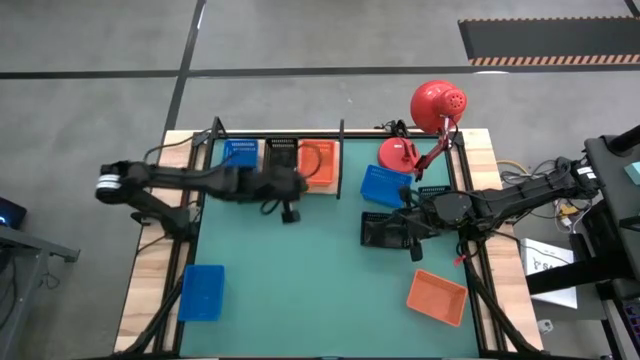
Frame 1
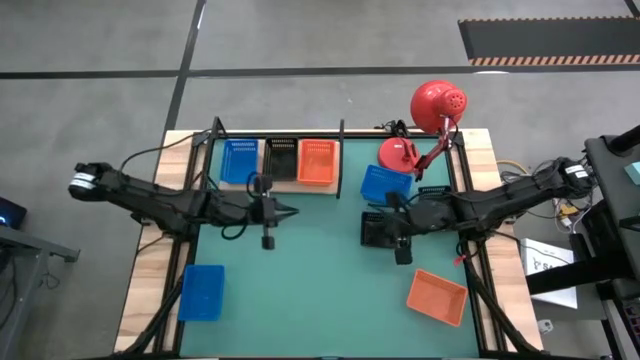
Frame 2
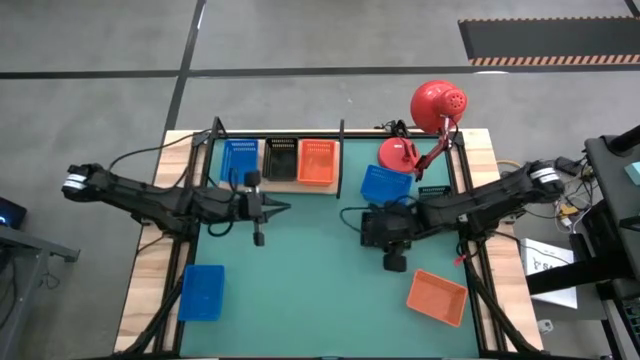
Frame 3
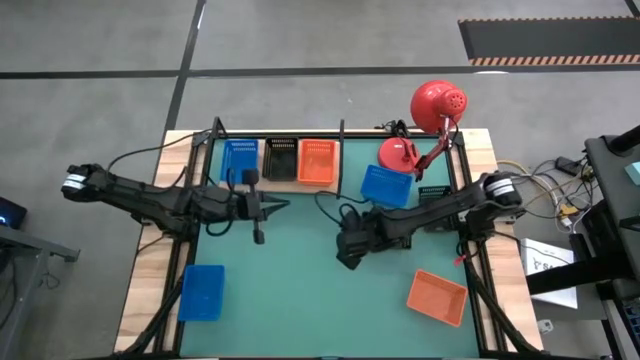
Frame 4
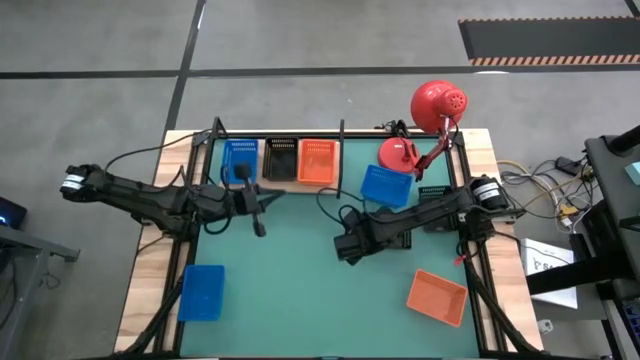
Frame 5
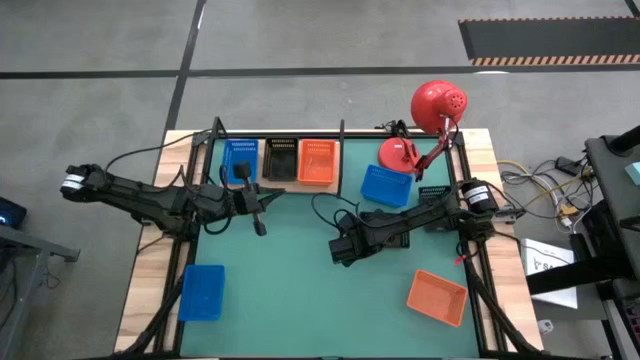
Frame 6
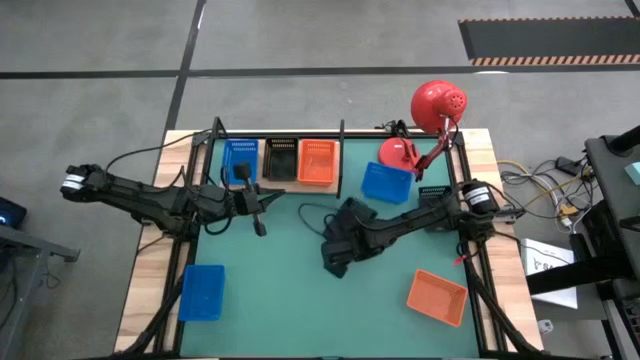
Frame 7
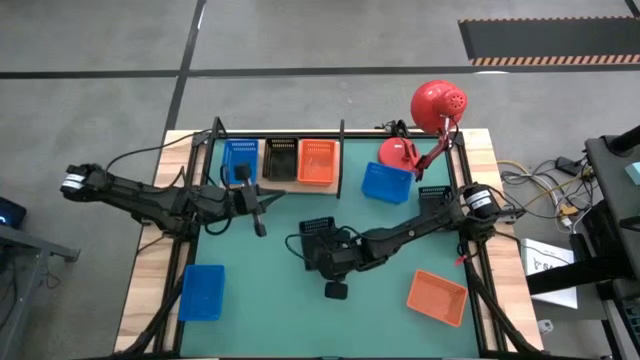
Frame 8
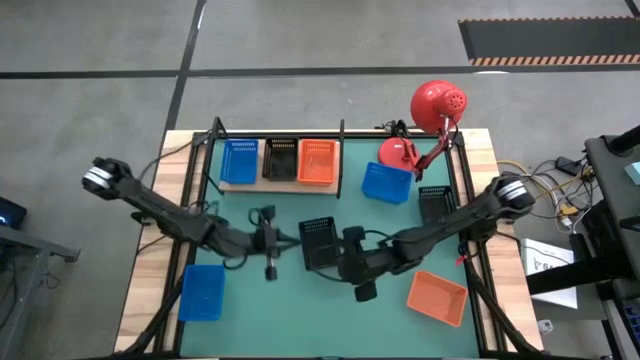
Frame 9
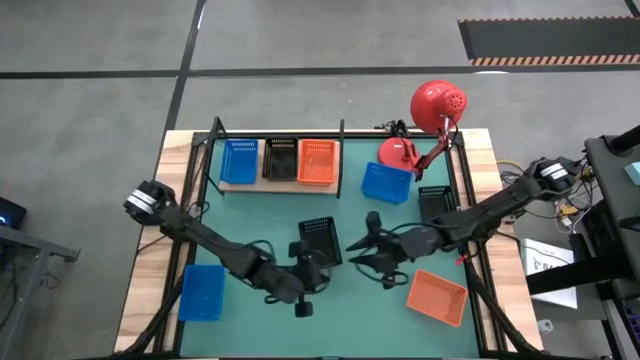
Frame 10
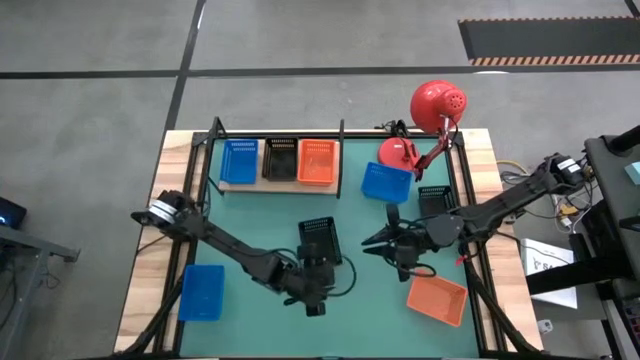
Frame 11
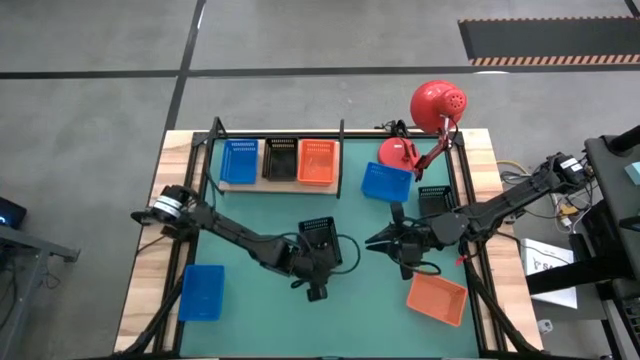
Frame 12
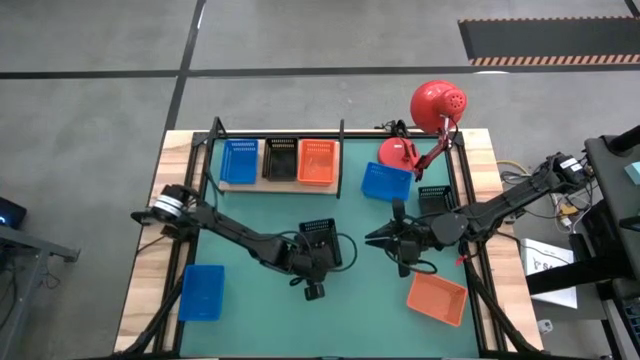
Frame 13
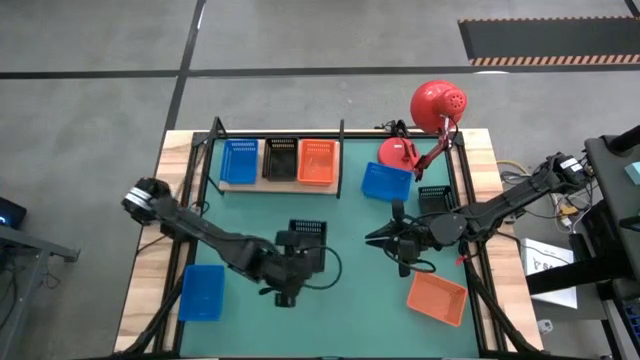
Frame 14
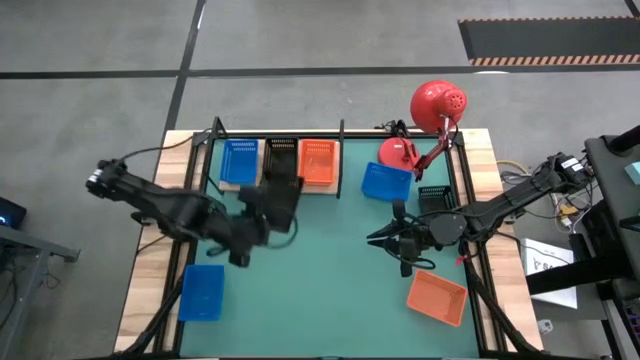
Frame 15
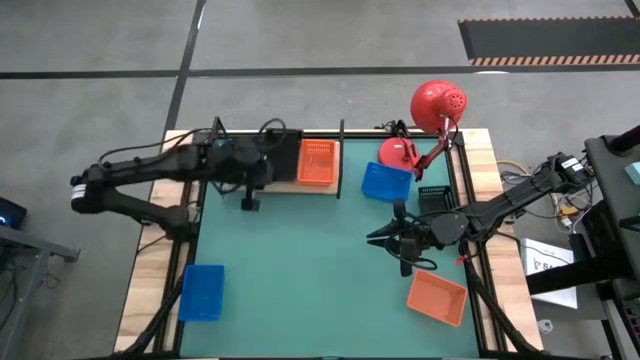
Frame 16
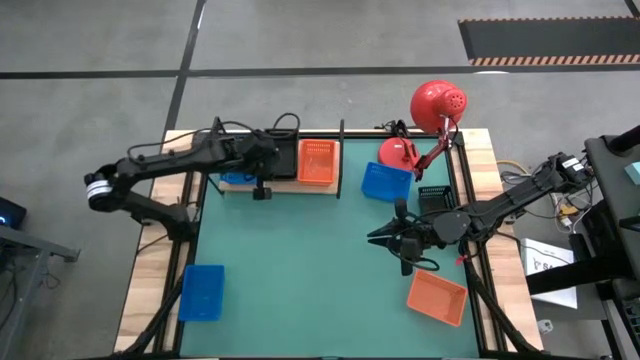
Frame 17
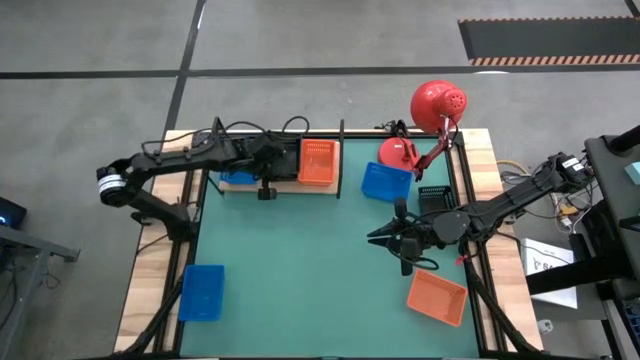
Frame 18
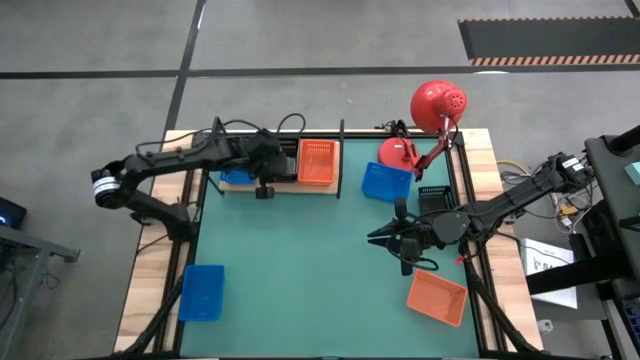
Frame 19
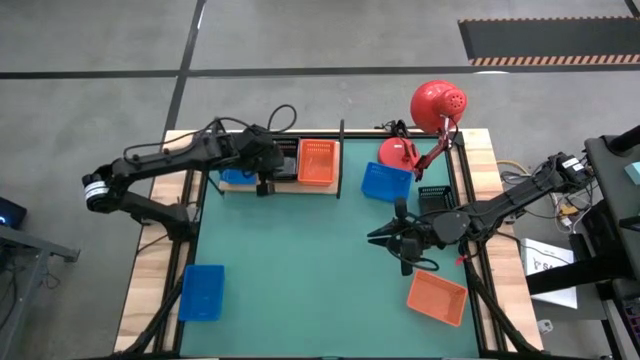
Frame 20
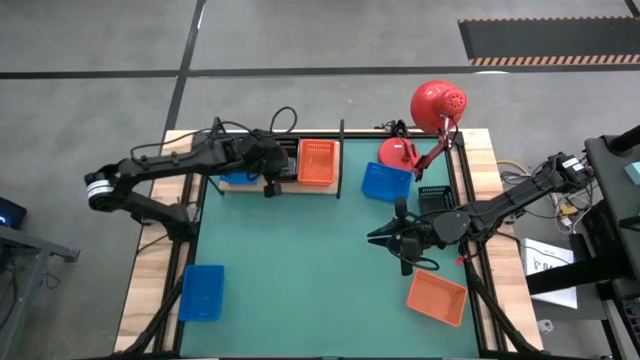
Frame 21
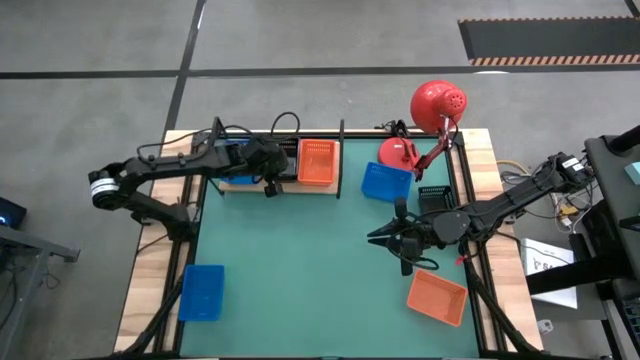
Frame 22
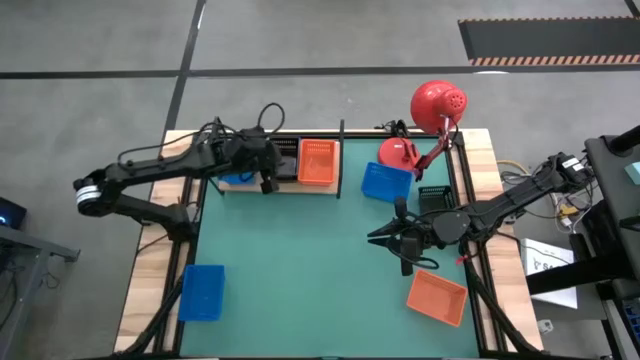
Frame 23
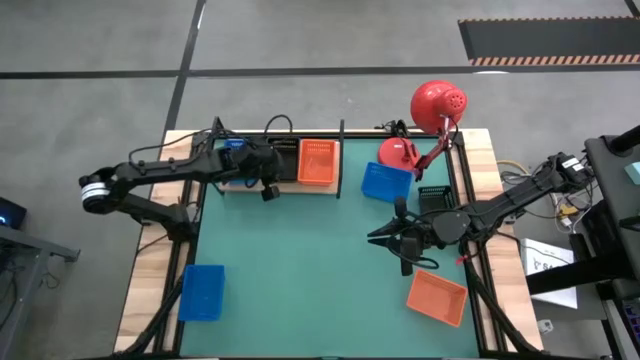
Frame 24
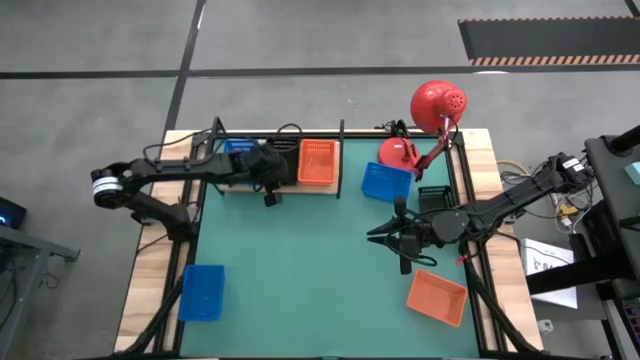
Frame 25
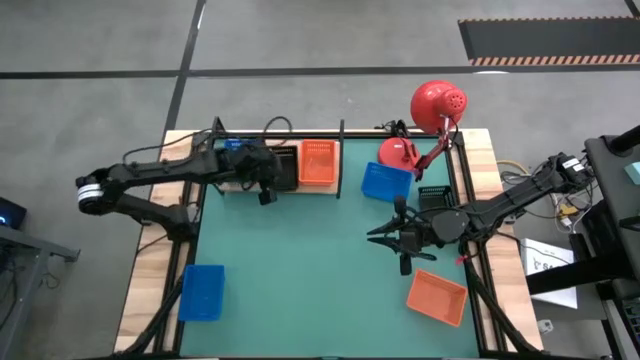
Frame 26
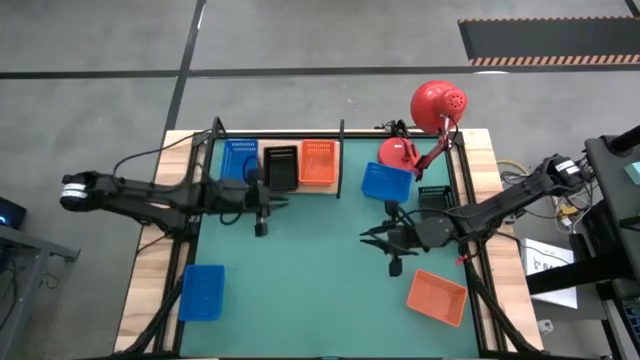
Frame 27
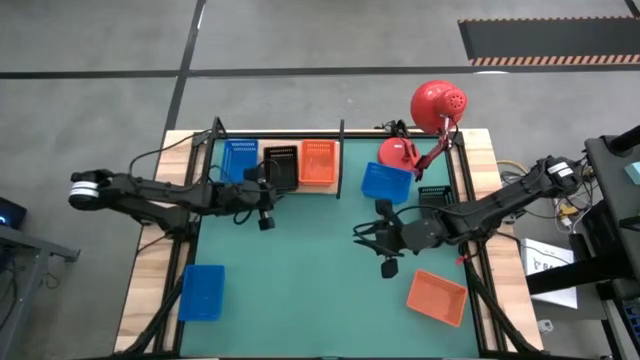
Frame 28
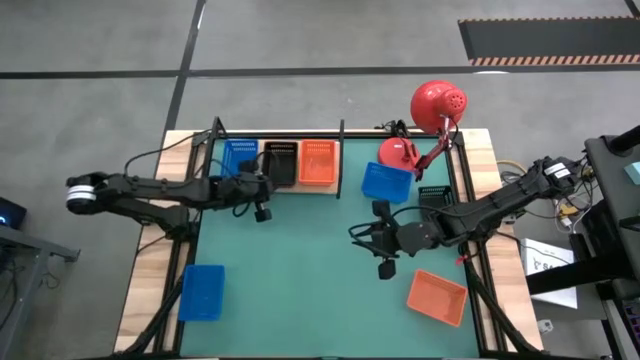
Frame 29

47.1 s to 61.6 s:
Task: Stack baskets on shelf by color
Stack the left black bin on top of the black bin on the shelf

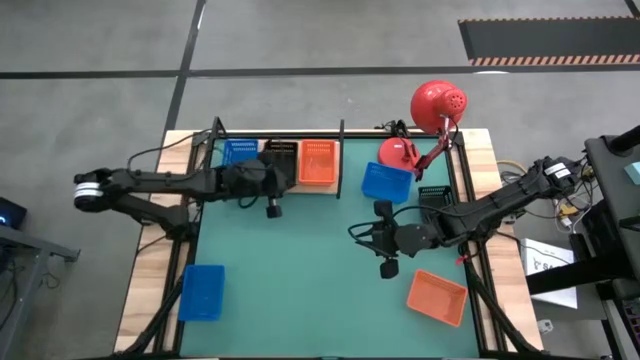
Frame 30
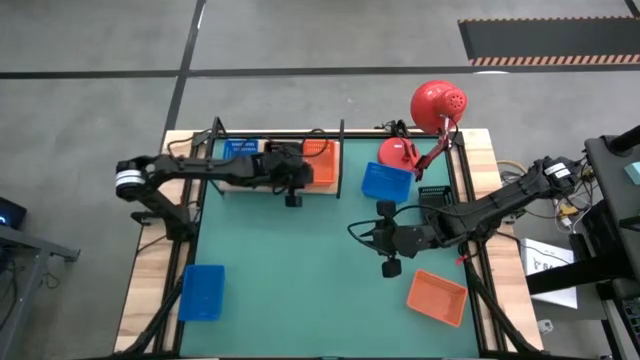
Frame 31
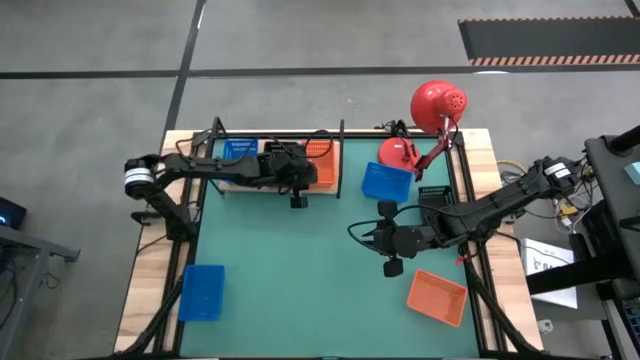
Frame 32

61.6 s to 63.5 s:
Adjust the orange bins on the shelf

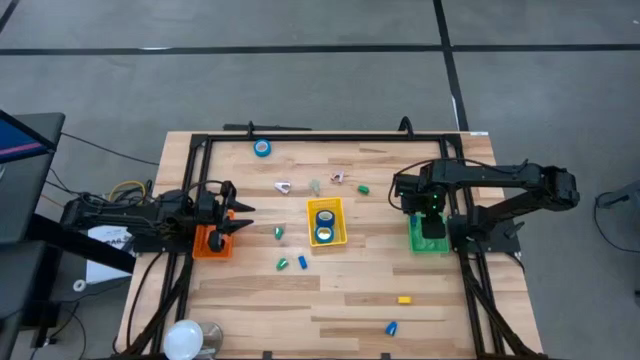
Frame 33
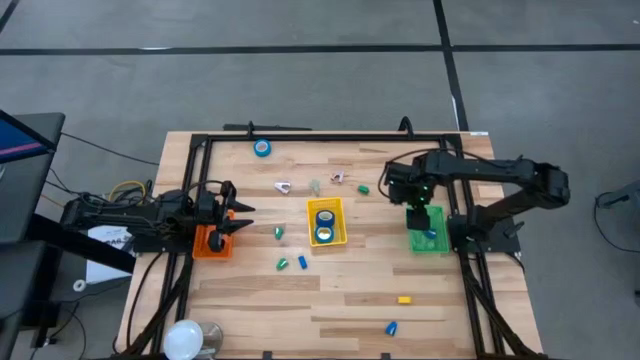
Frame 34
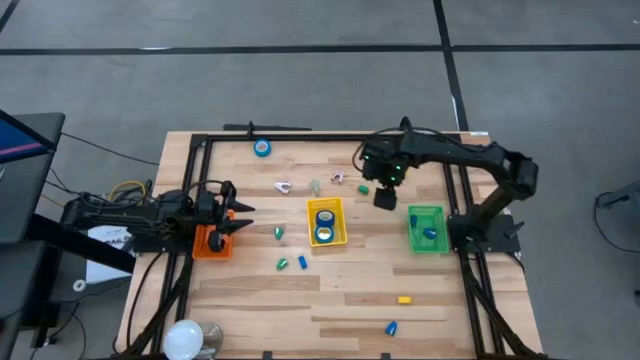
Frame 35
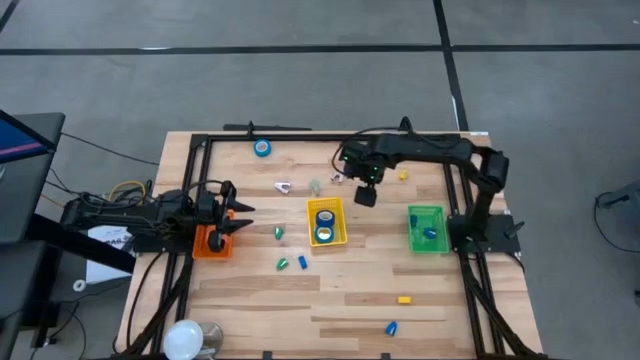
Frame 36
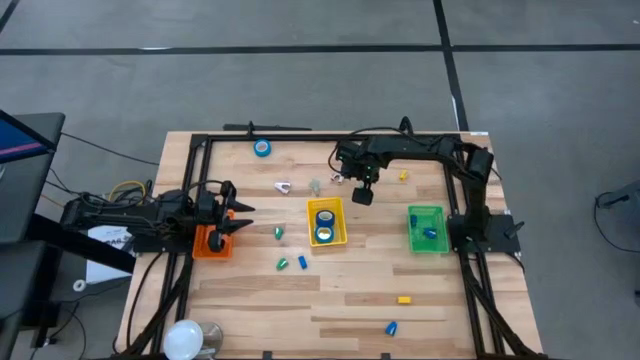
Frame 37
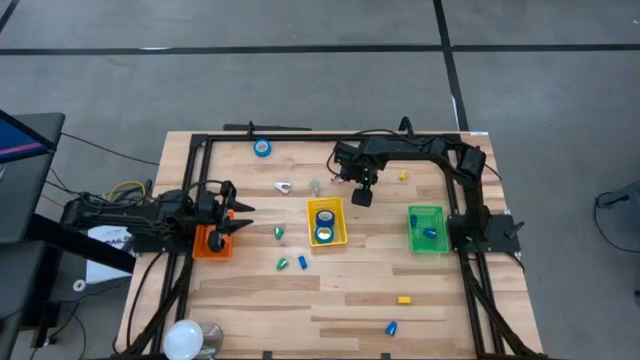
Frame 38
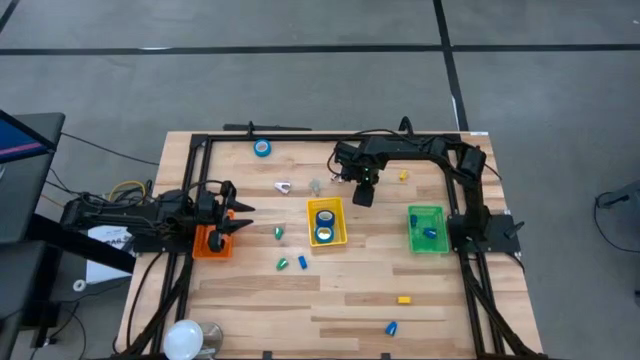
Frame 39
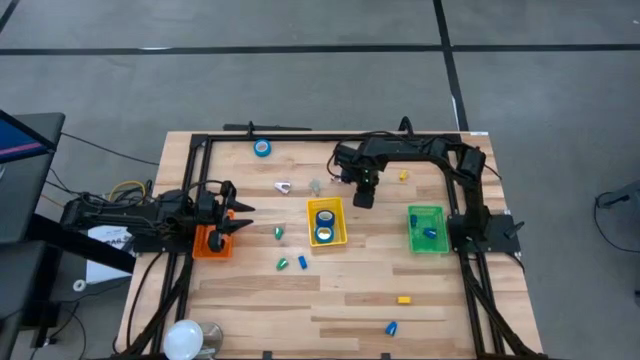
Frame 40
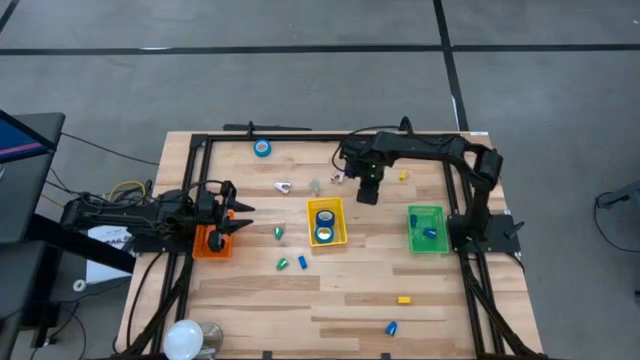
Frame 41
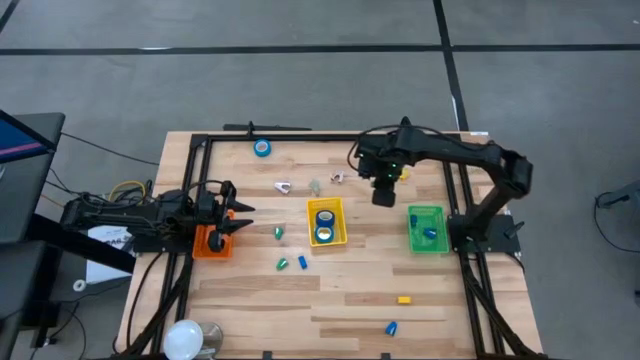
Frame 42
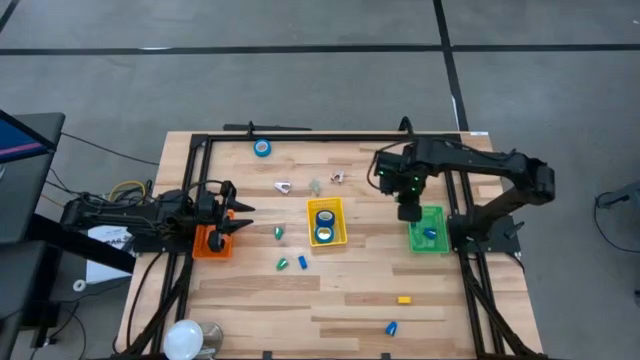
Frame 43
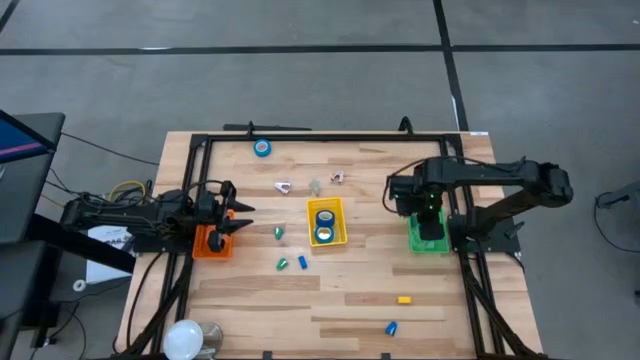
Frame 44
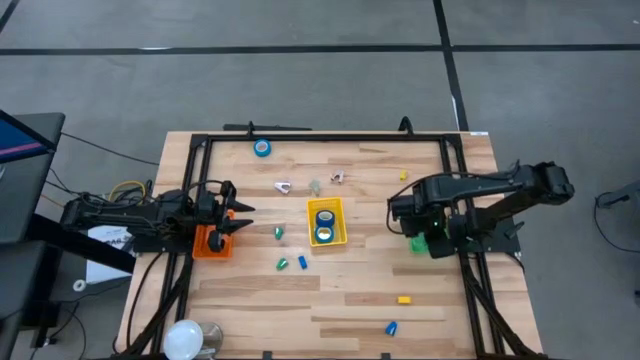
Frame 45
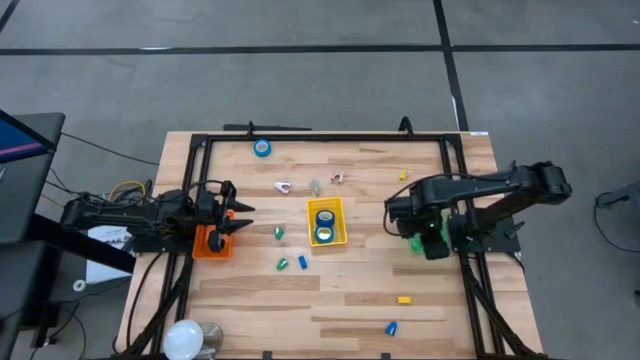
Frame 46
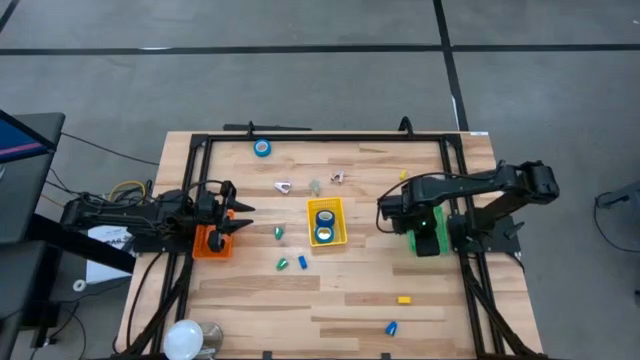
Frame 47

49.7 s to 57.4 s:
Task: Pick and place Stapler, Stapler remover, tape
Put the green stapler into the green basket
